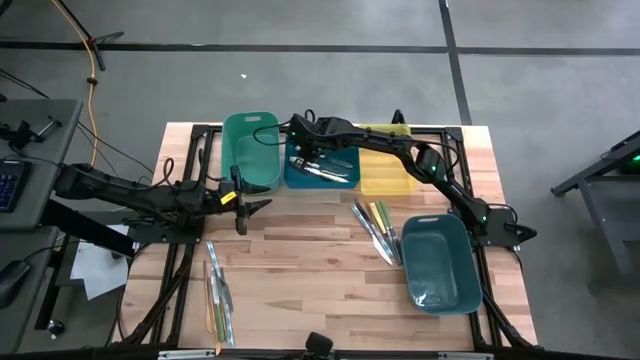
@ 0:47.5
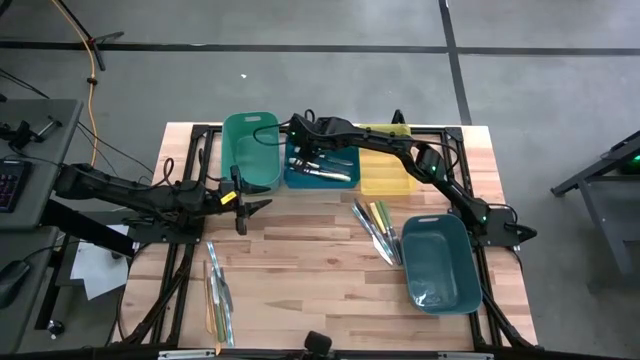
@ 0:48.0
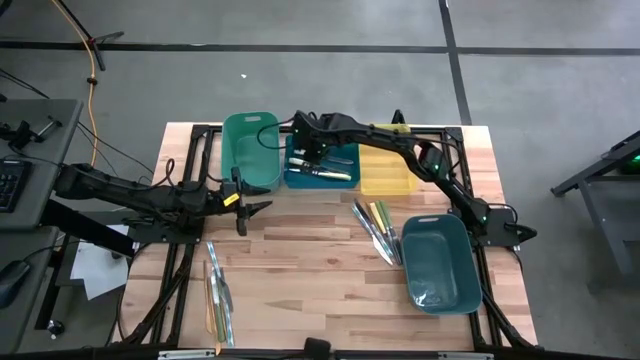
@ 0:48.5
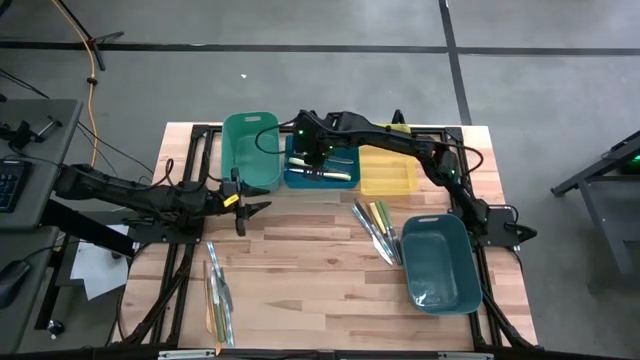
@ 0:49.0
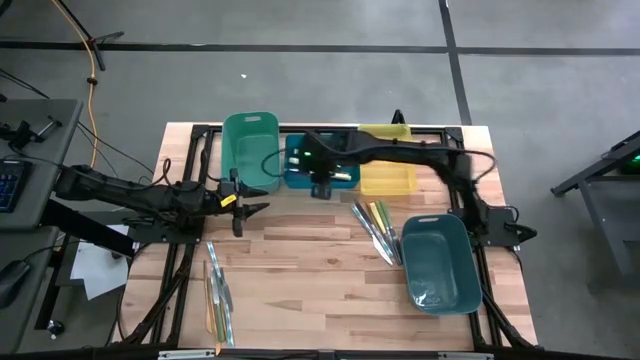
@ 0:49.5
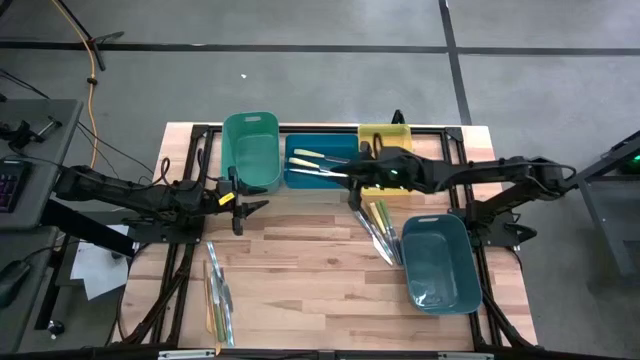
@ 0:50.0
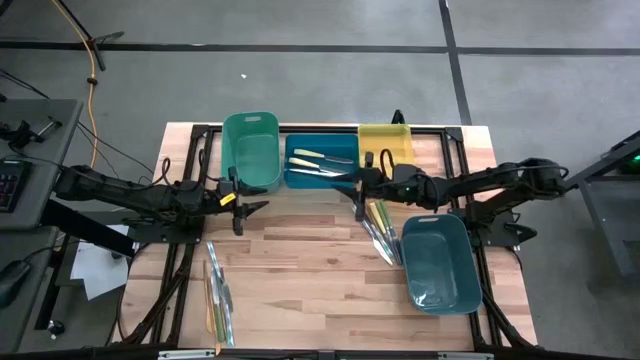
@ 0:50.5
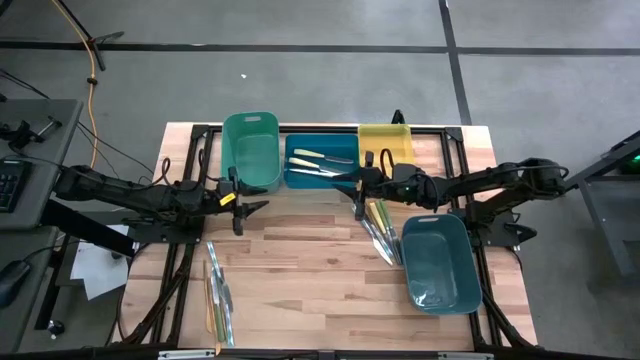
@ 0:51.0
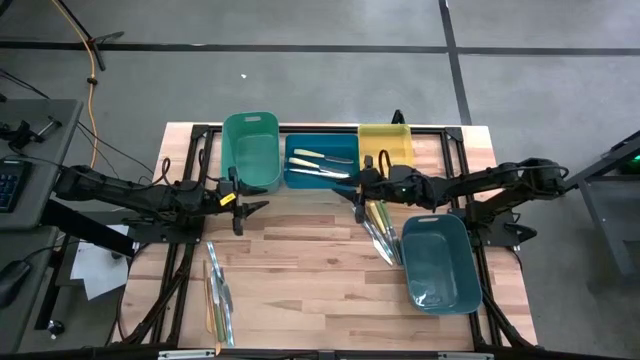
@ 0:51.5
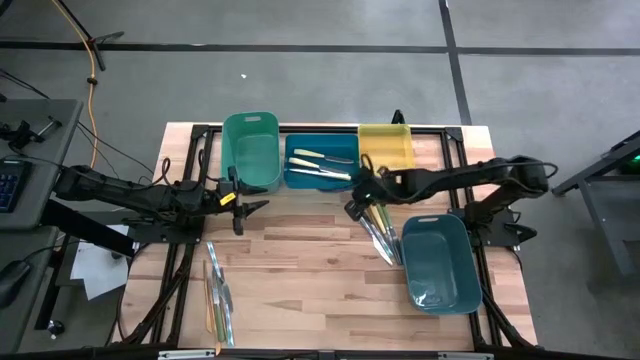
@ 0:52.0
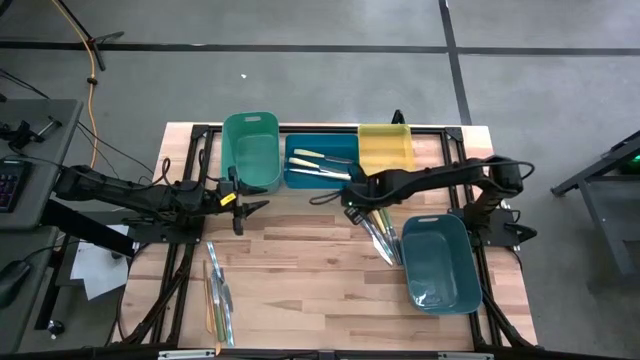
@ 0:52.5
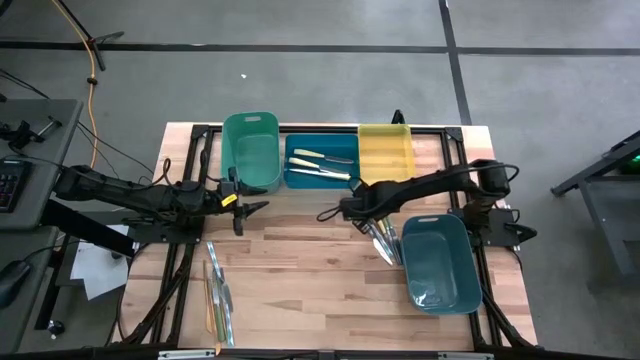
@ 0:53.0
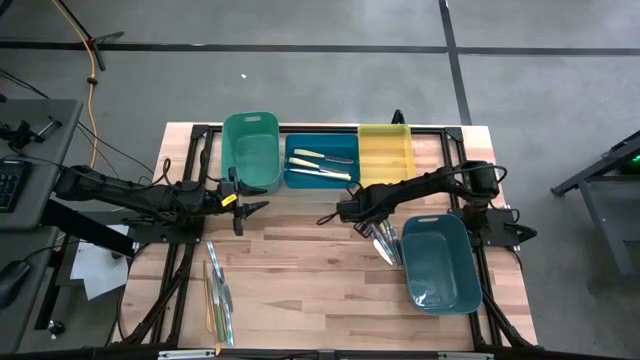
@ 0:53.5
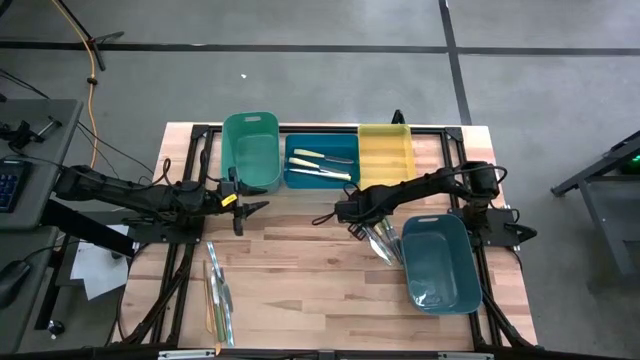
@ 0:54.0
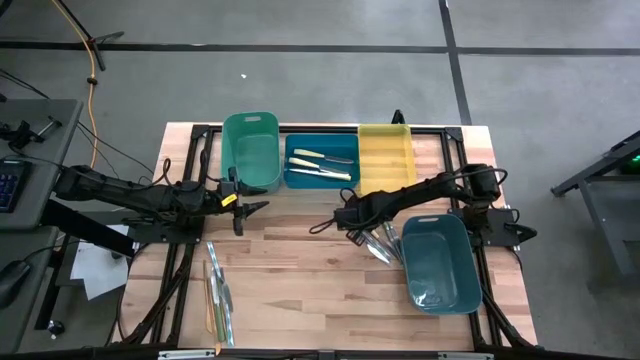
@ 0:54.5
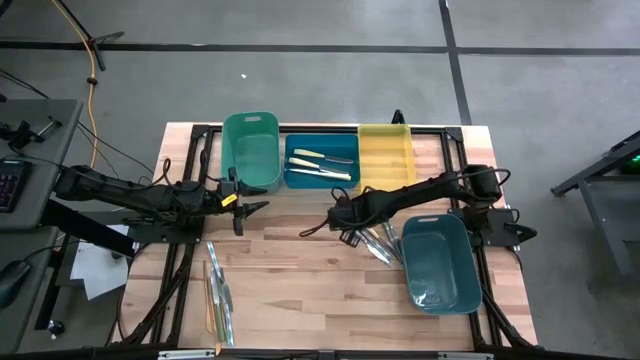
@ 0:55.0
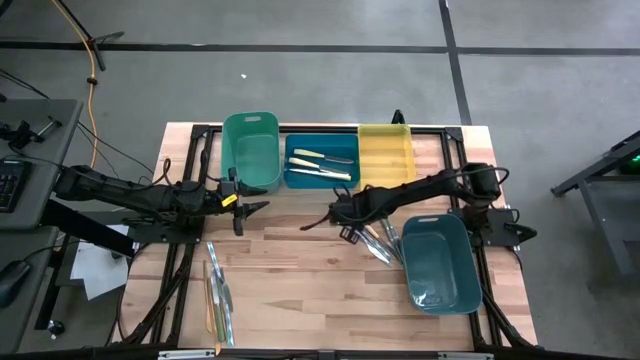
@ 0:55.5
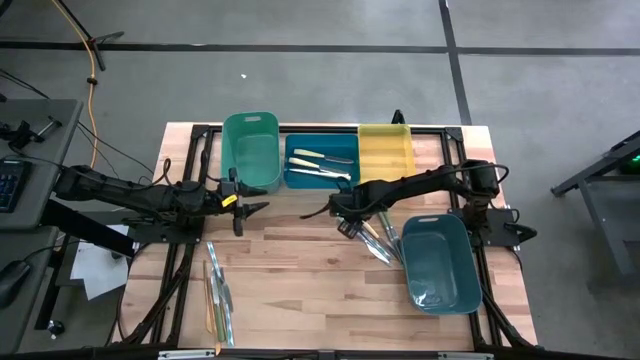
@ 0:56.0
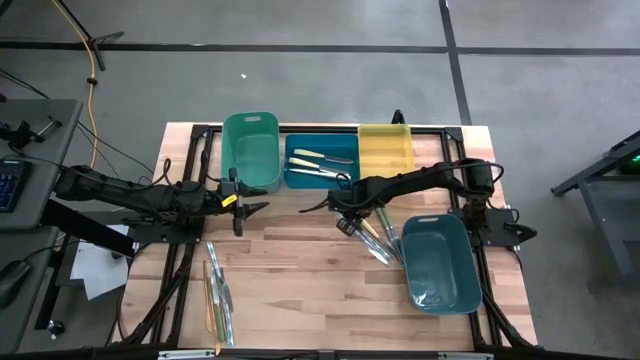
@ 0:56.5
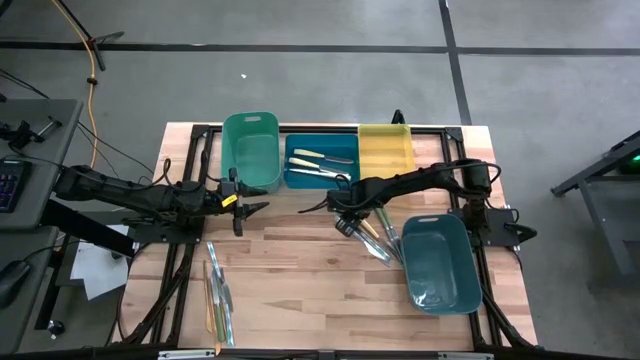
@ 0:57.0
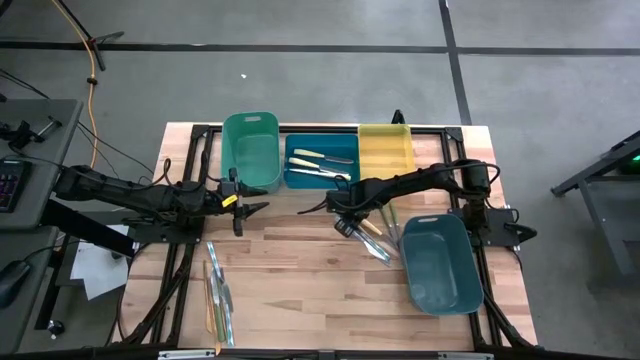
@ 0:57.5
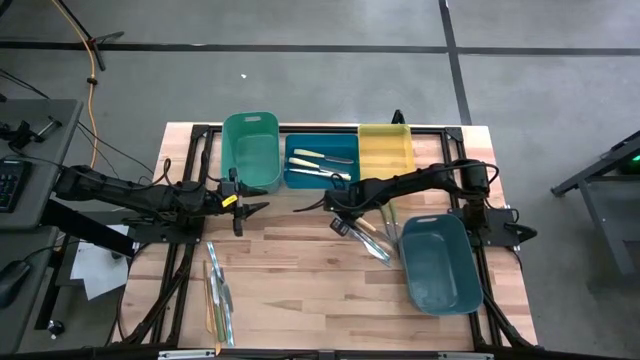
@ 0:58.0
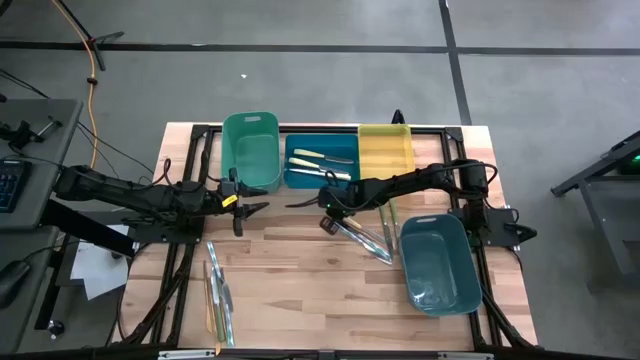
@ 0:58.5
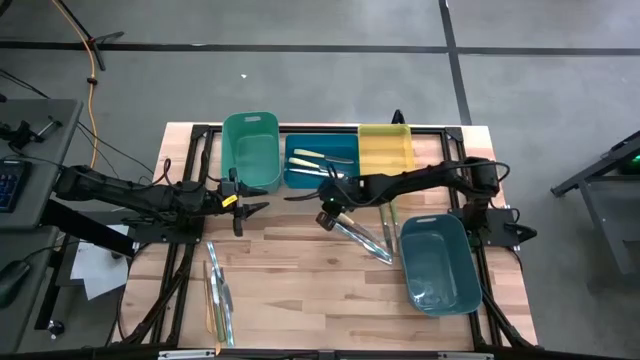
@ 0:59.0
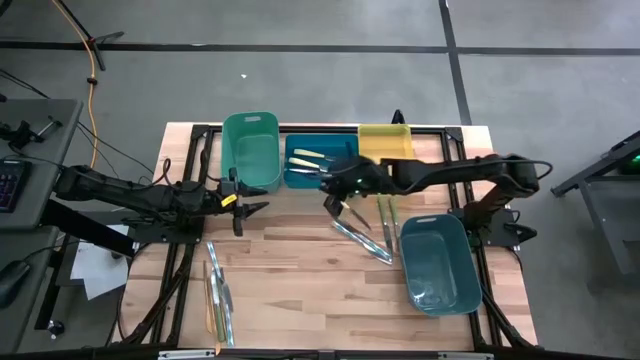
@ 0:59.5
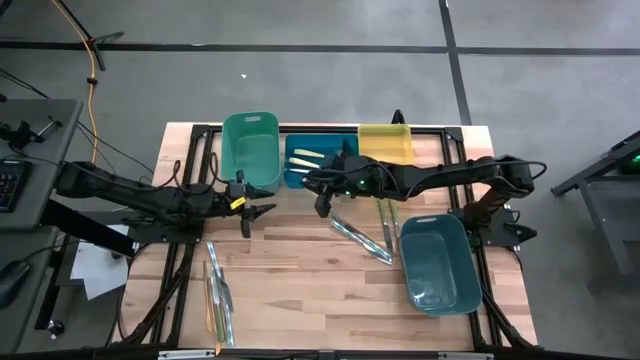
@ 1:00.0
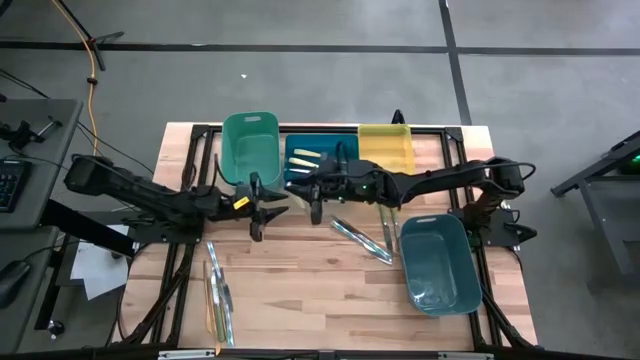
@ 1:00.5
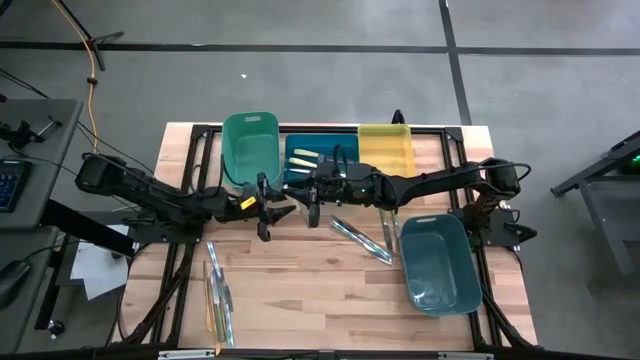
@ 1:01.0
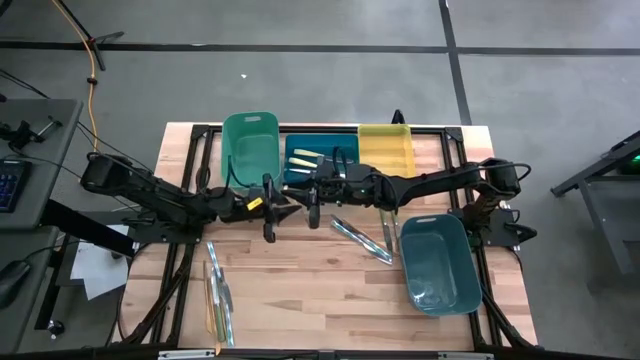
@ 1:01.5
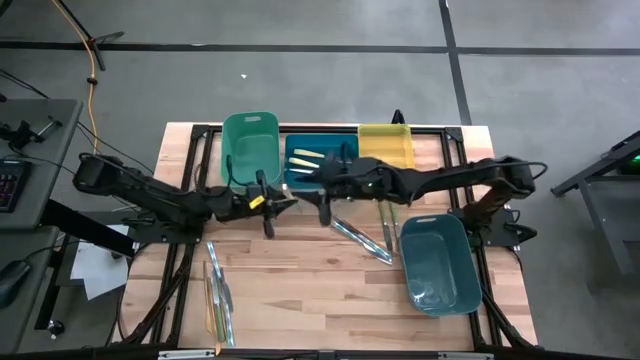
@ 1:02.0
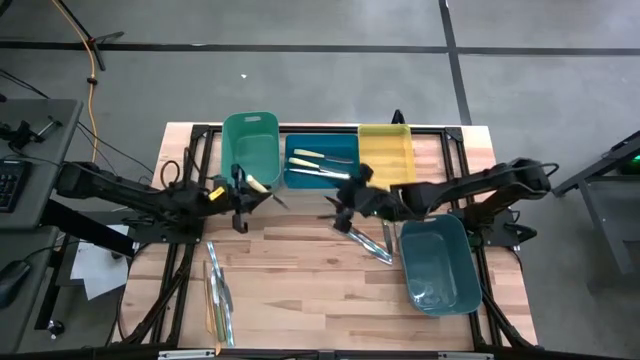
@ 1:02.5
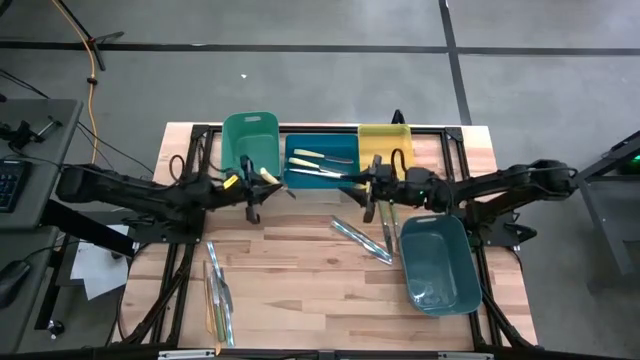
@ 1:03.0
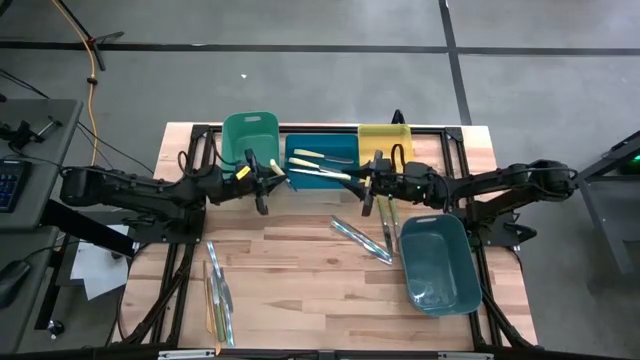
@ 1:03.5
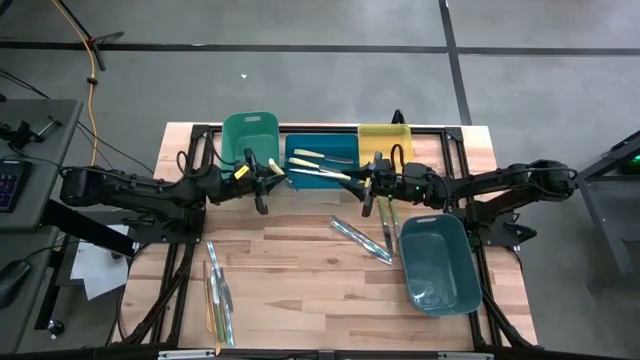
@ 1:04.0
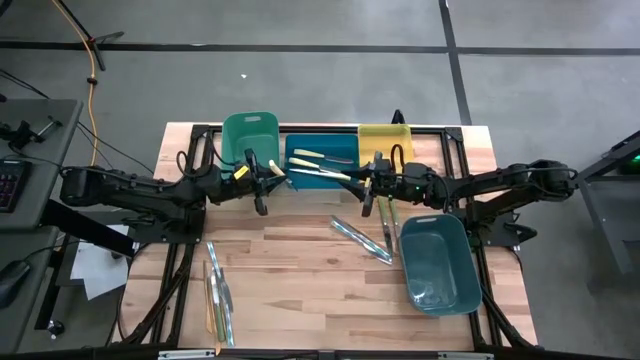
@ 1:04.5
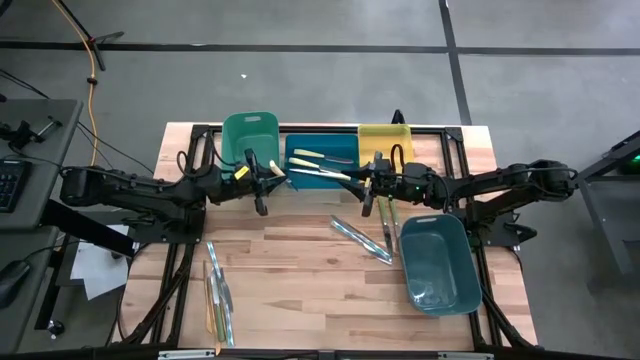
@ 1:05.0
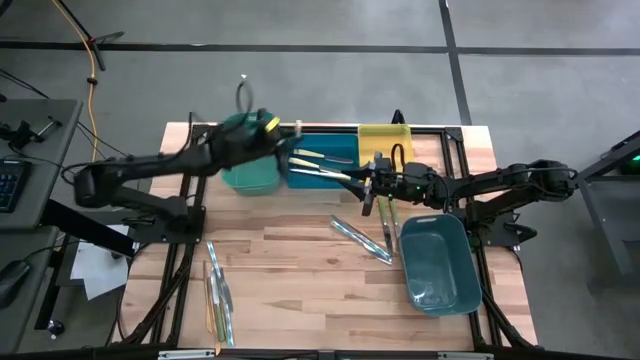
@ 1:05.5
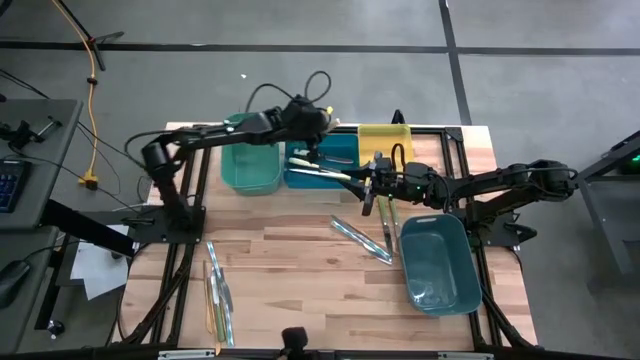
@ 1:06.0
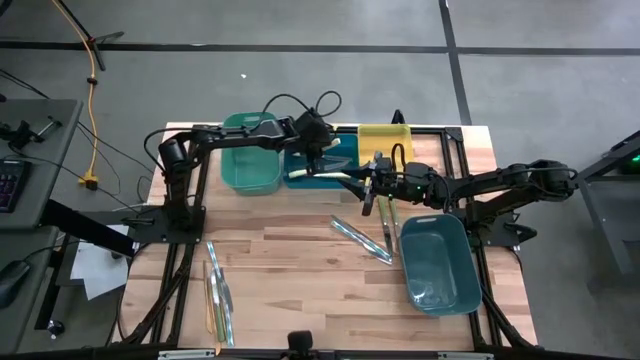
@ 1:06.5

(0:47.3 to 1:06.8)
Task: Sort silverware by color (type)
Put the yellow knife into the blue bin
